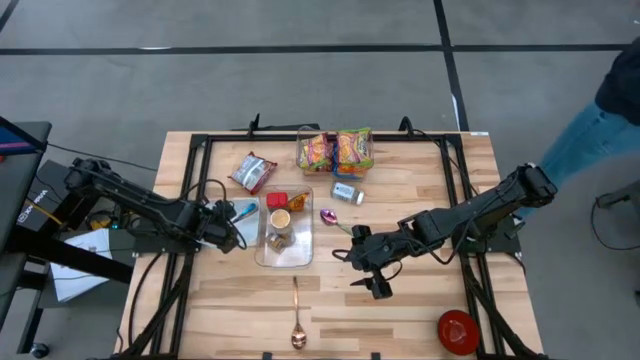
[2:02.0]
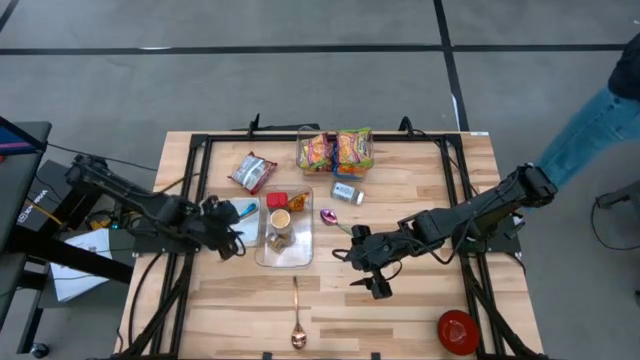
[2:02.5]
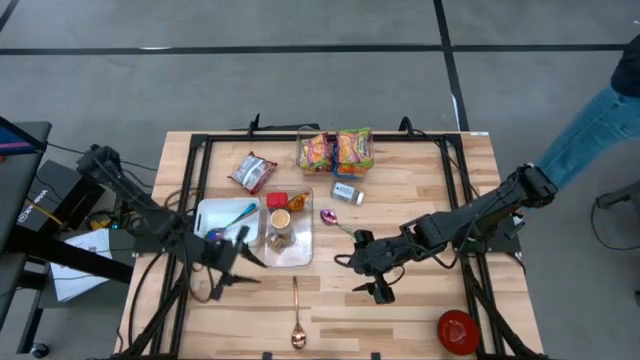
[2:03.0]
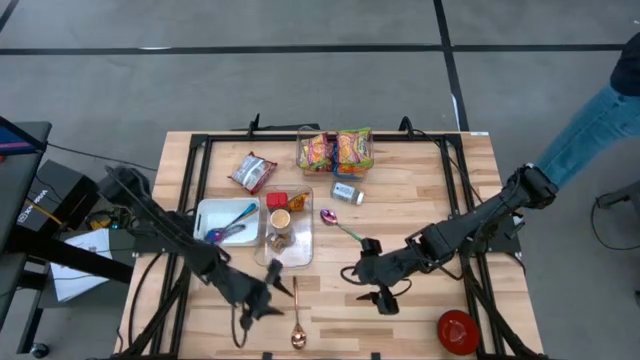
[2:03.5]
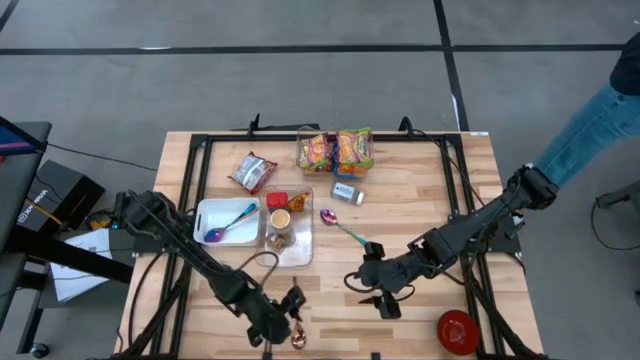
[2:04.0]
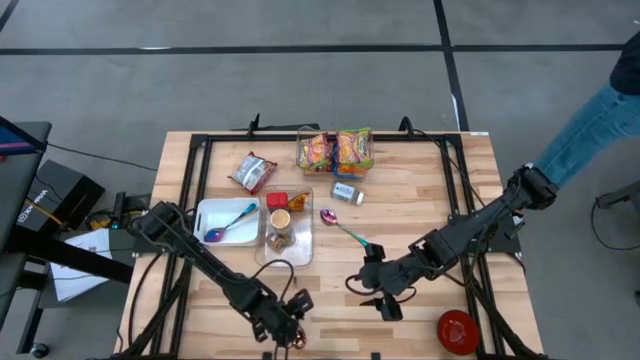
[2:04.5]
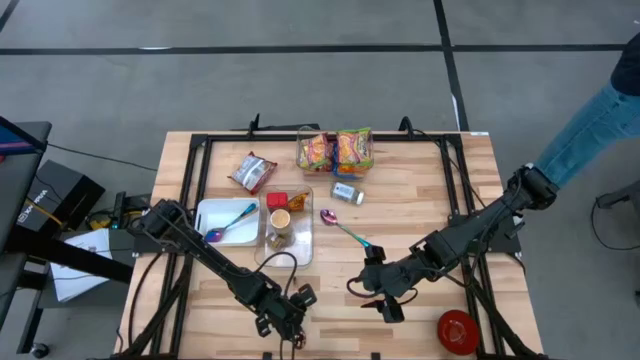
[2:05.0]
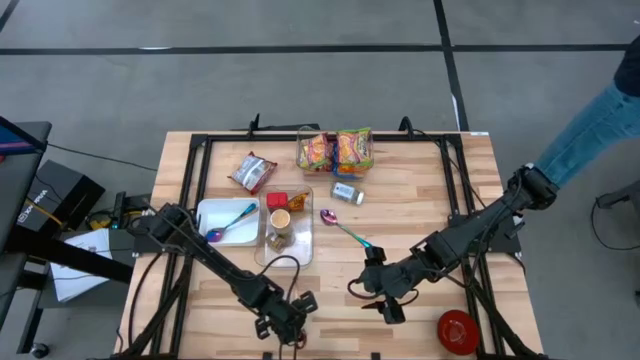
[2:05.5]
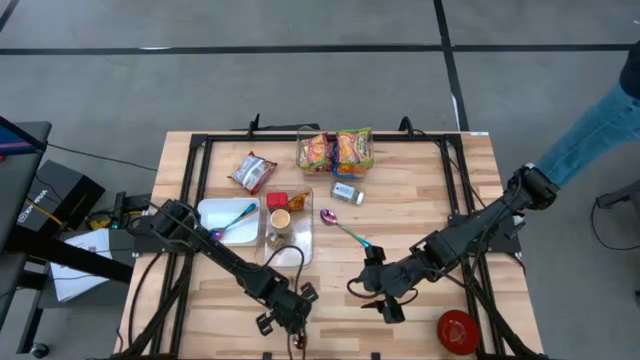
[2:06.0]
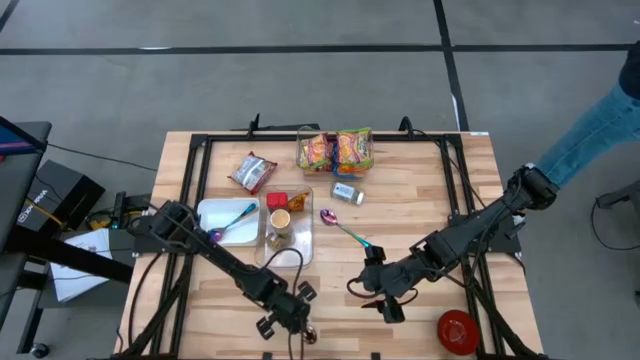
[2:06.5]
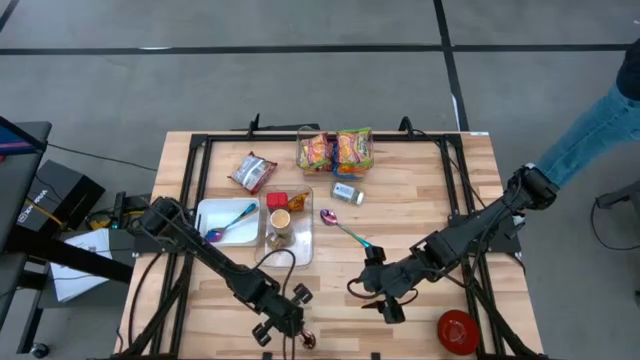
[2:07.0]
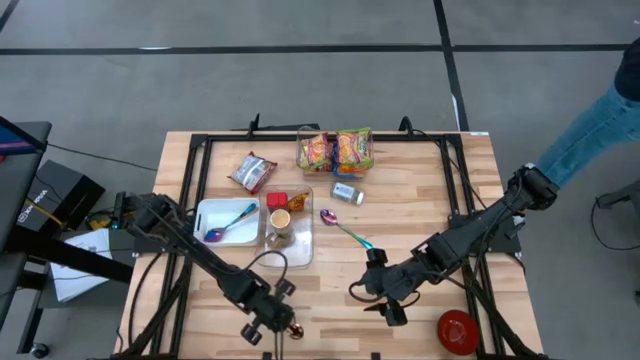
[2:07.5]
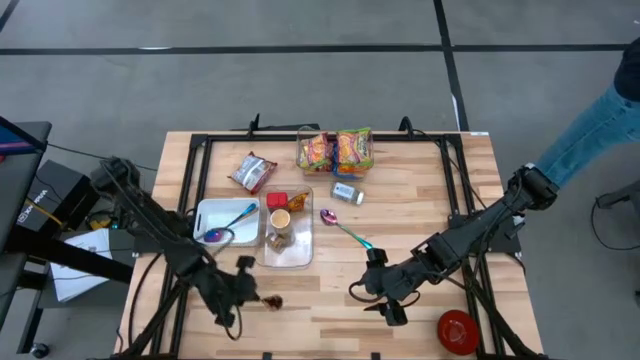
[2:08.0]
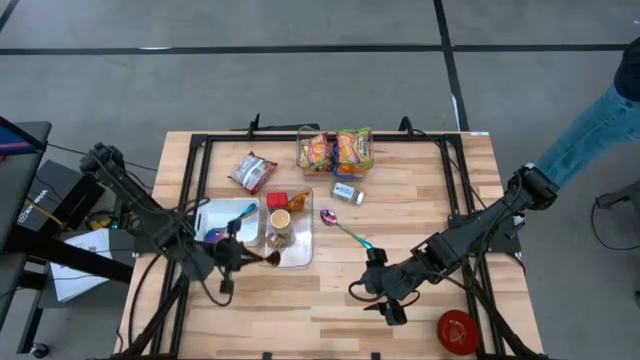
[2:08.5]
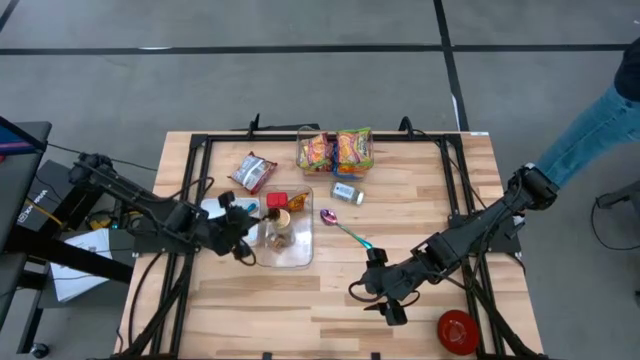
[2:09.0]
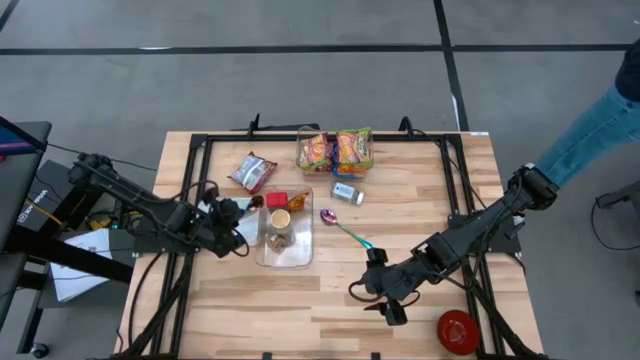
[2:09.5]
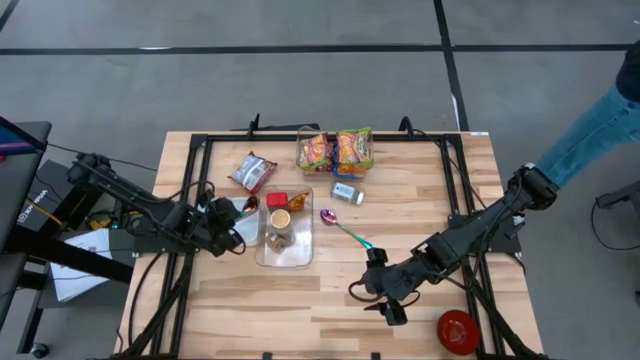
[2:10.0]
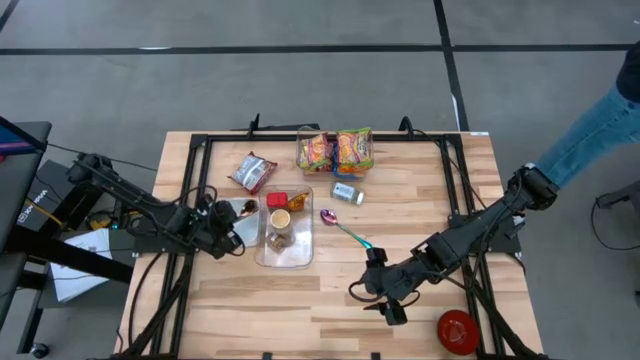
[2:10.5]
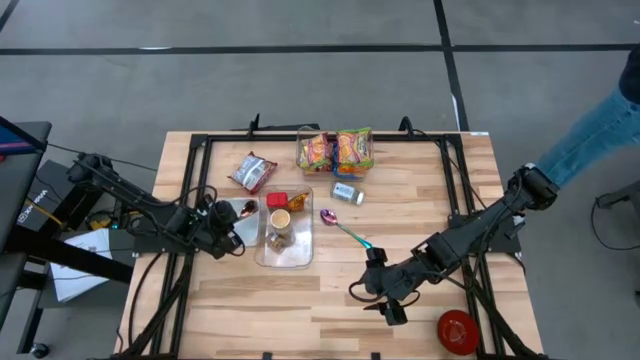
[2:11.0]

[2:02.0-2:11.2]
Task: Pick & Place Food Item
Put the gold spoon into the white bin

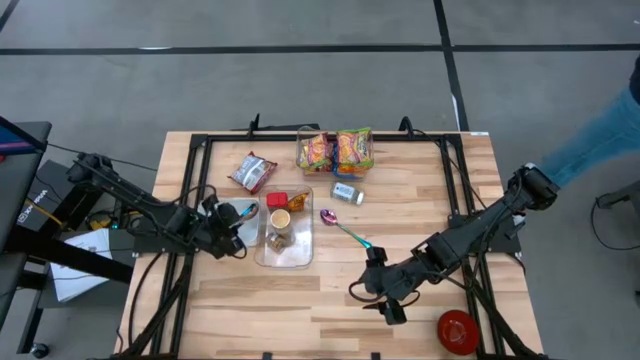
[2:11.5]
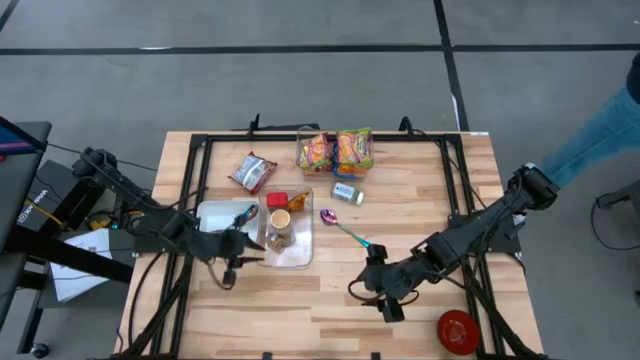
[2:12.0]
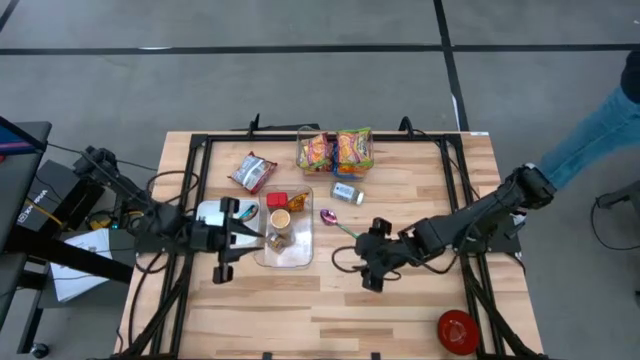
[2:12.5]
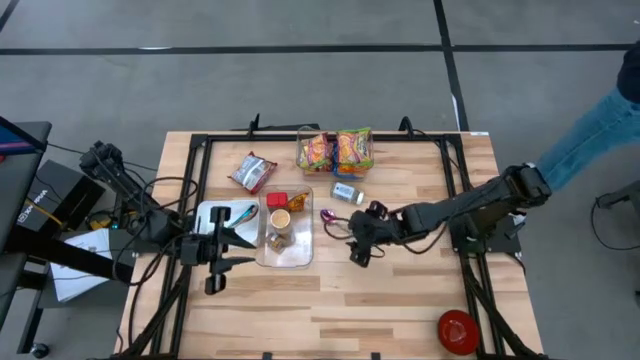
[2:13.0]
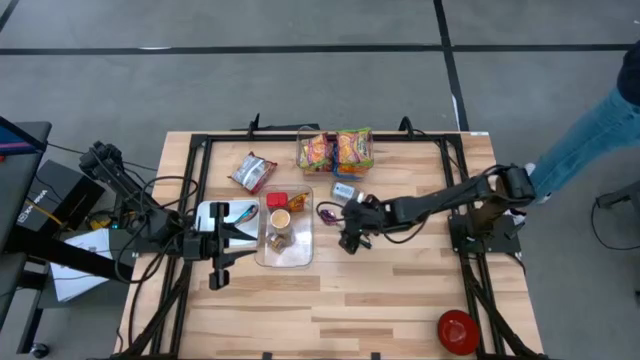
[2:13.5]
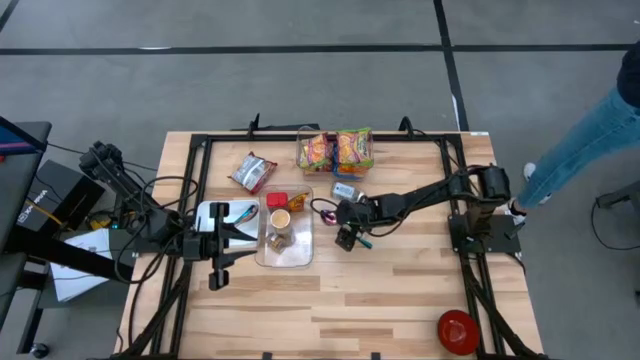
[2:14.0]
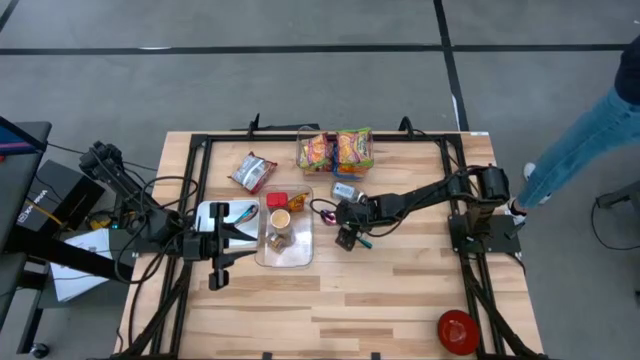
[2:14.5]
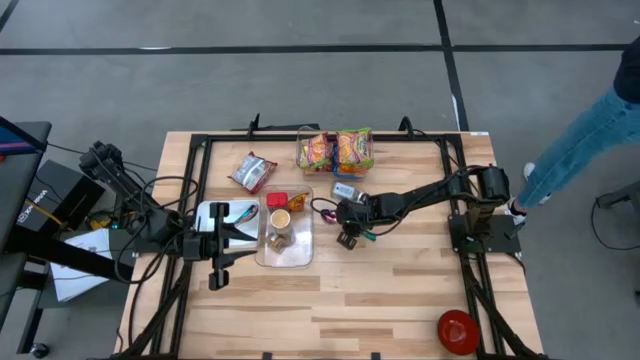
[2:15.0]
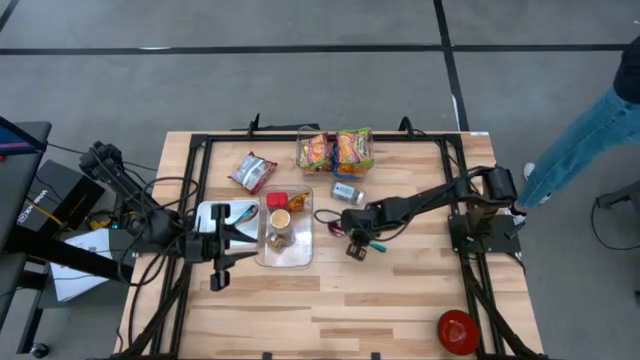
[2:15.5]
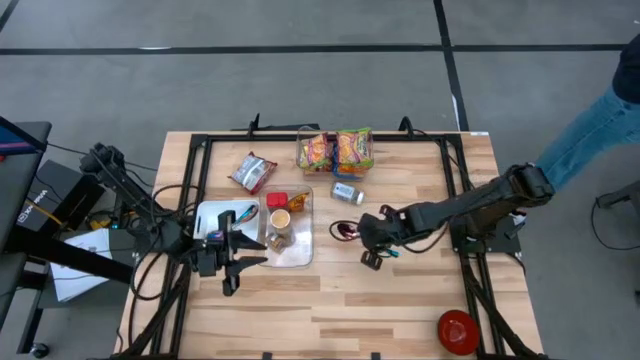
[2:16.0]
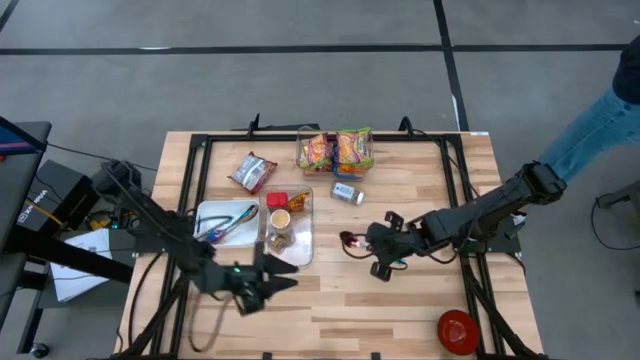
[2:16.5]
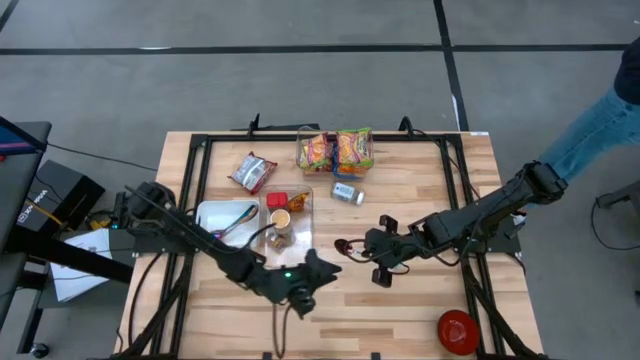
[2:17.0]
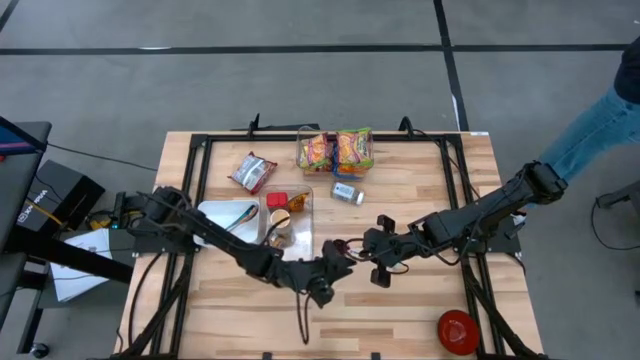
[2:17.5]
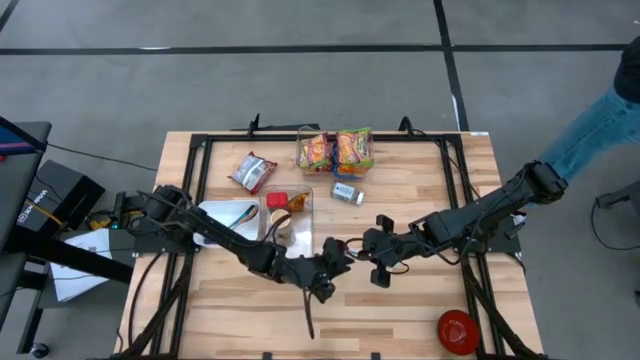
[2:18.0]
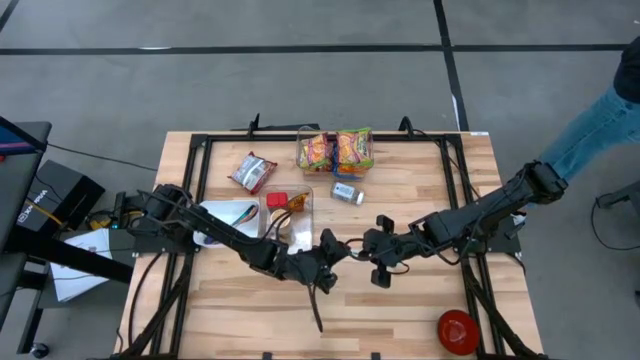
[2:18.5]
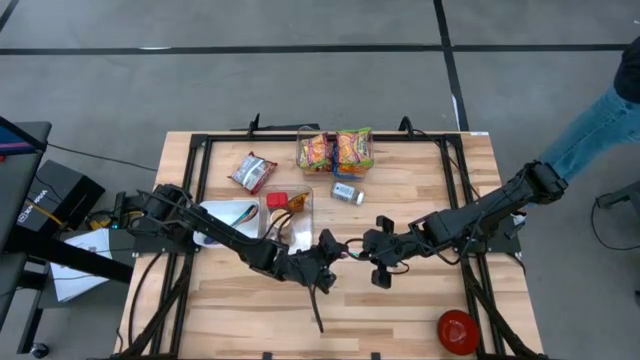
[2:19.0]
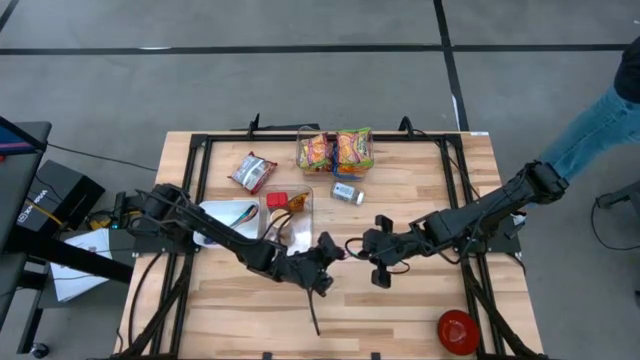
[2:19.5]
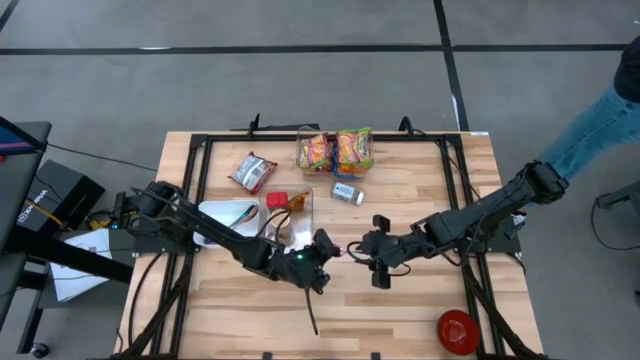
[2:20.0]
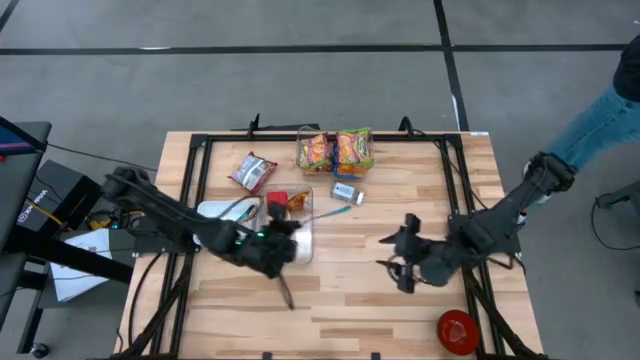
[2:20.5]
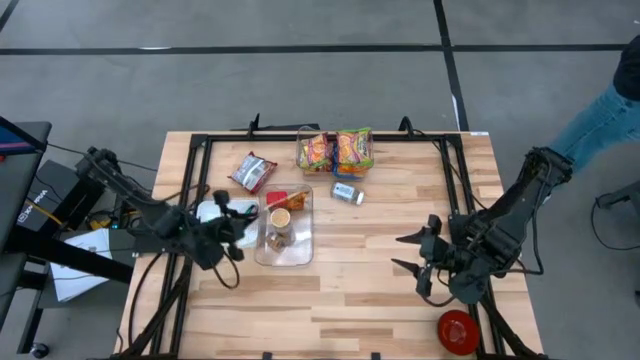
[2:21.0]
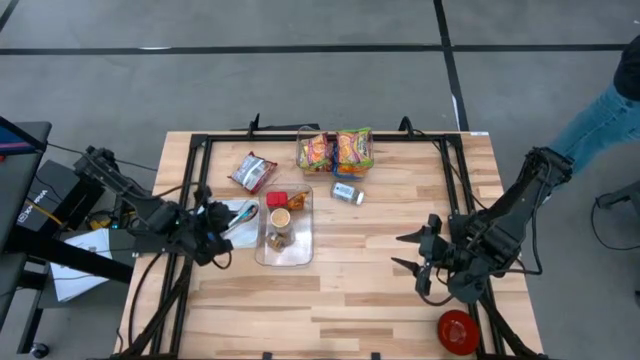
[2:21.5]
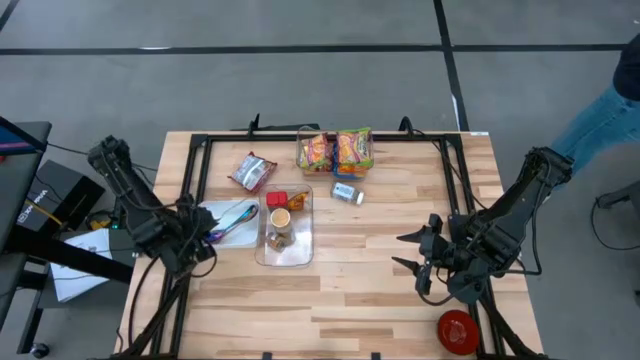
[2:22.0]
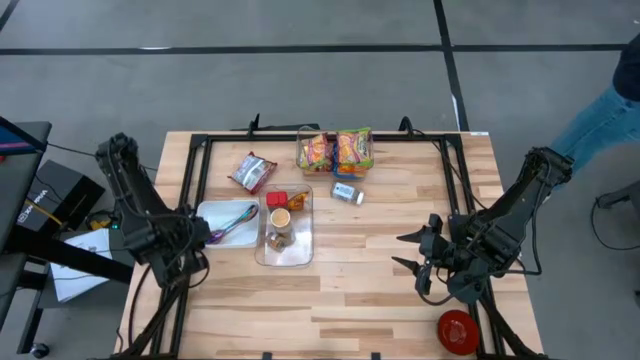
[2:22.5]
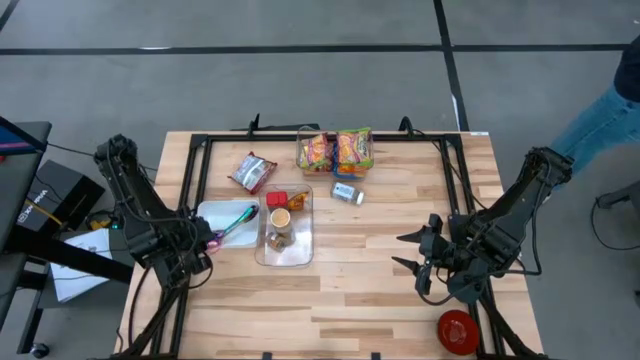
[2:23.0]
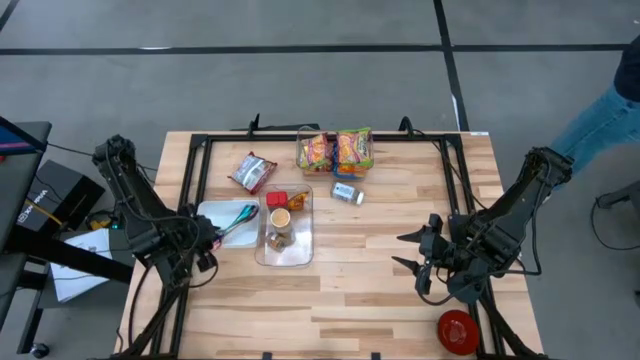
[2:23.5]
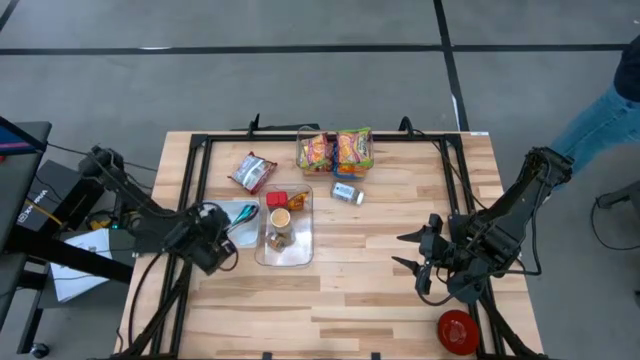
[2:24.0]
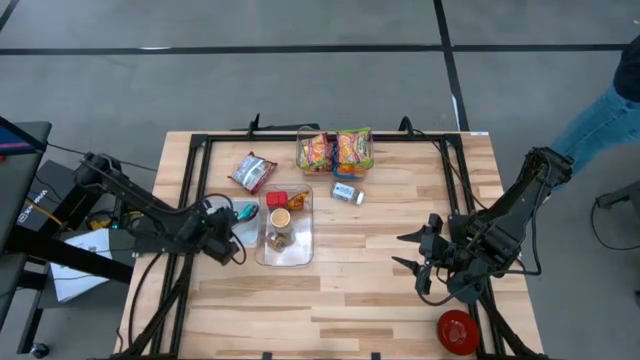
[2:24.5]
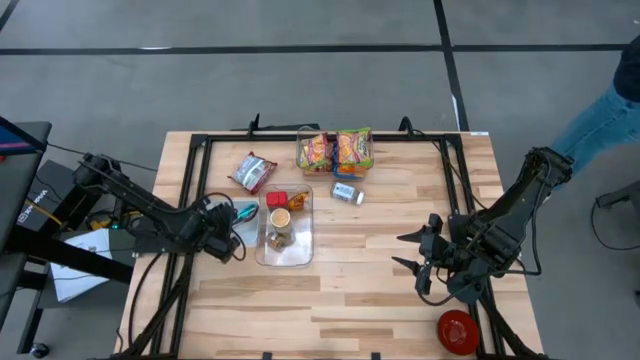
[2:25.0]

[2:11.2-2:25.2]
Put the blue spoon into the white bin
